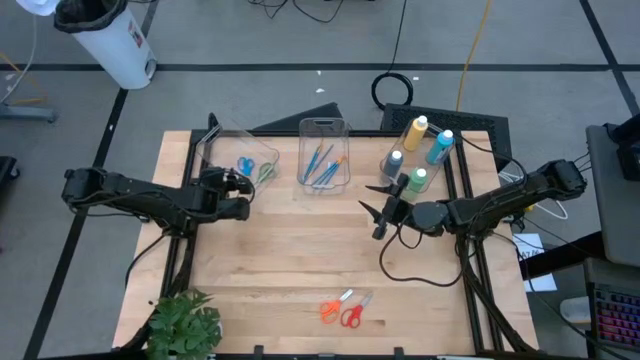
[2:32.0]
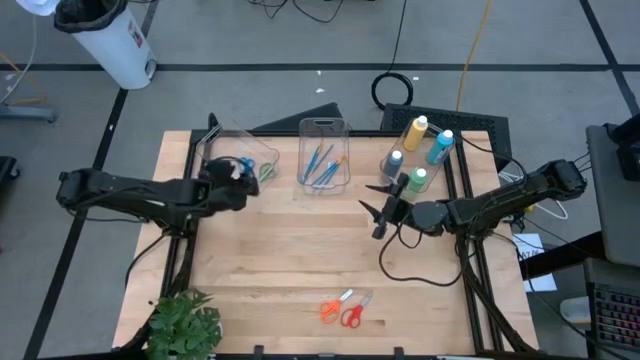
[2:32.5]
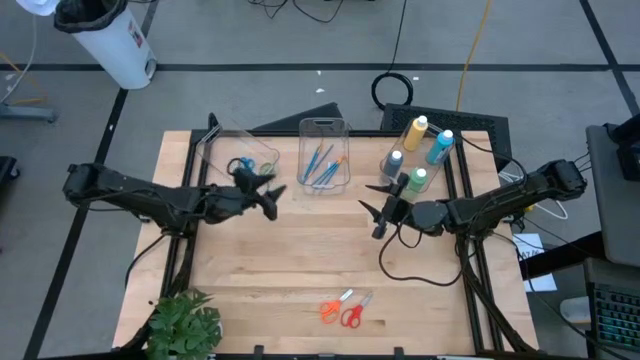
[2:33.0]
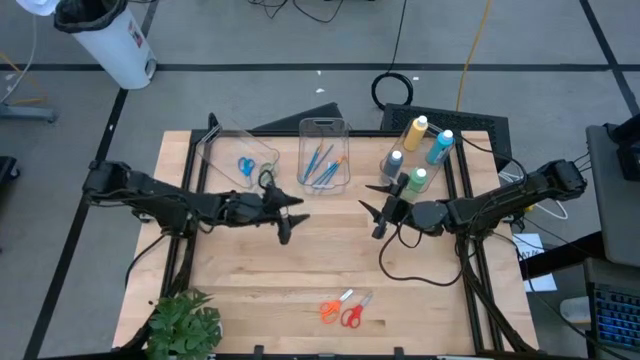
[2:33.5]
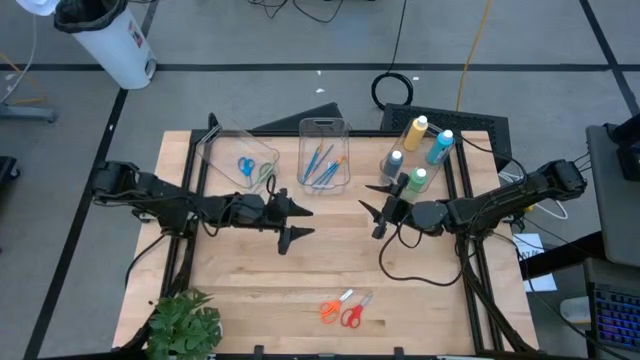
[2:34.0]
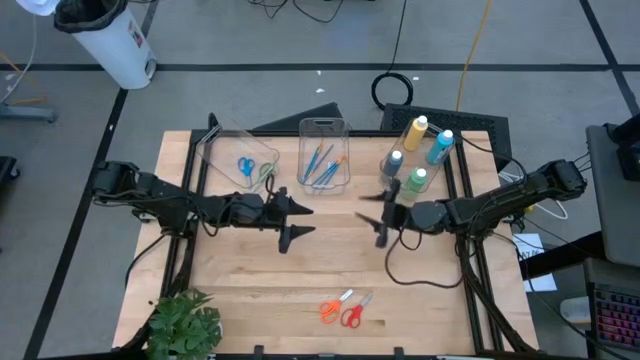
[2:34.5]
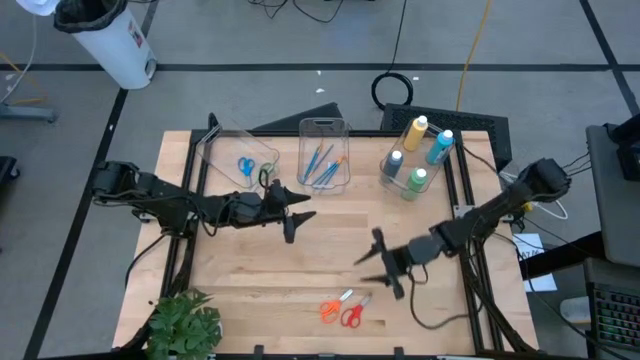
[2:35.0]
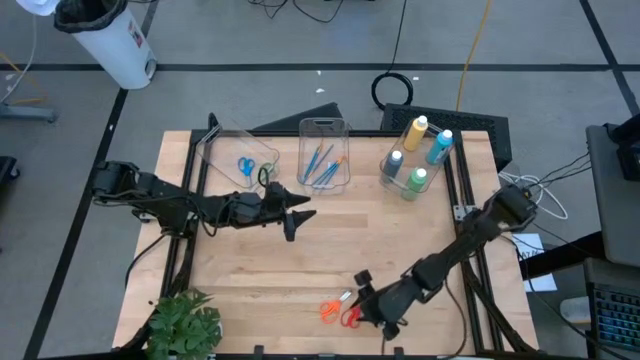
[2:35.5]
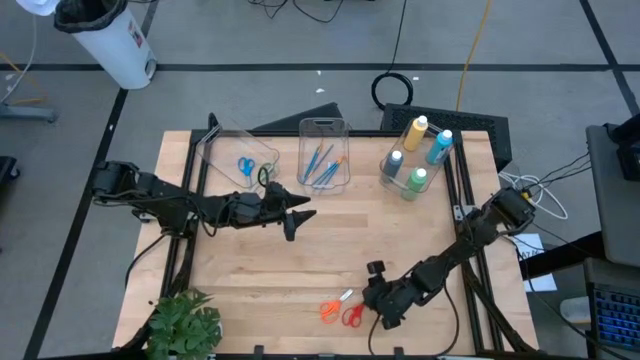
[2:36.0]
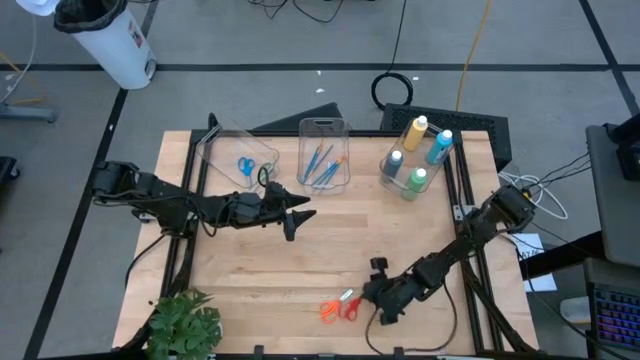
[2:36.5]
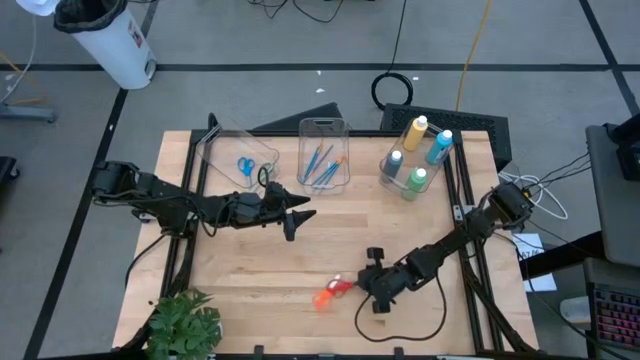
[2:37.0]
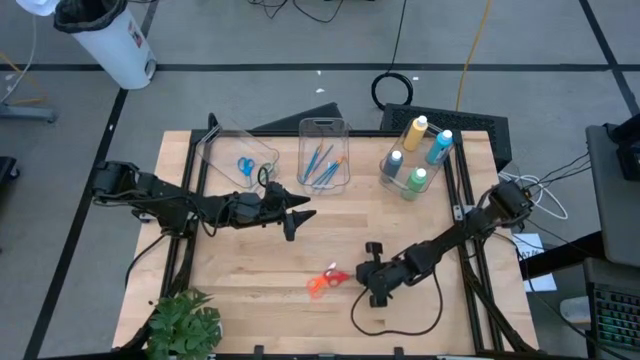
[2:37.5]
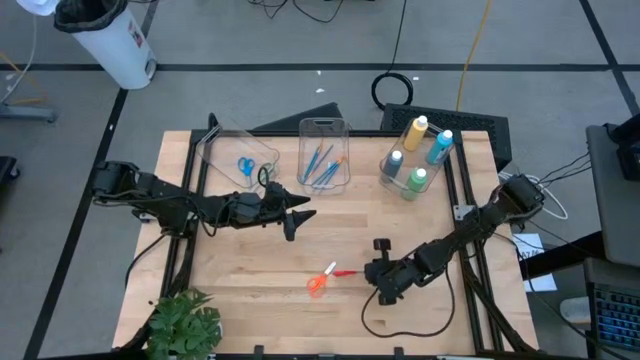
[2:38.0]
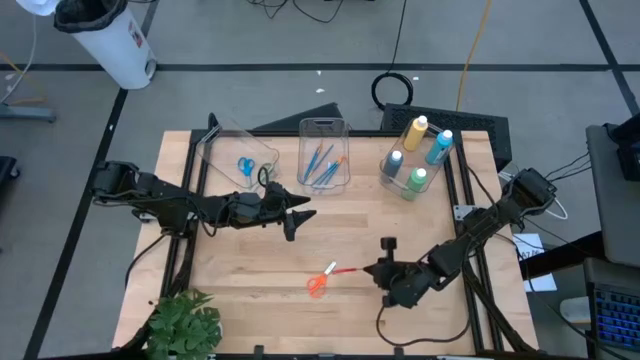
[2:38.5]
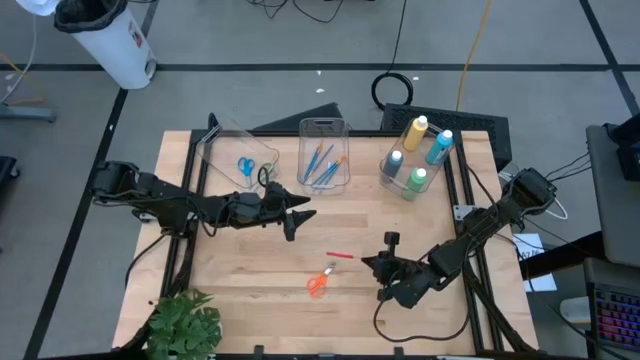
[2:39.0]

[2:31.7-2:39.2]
Task: Pick & Place Paint Supplies
Put the red scissors into the left transparent bin

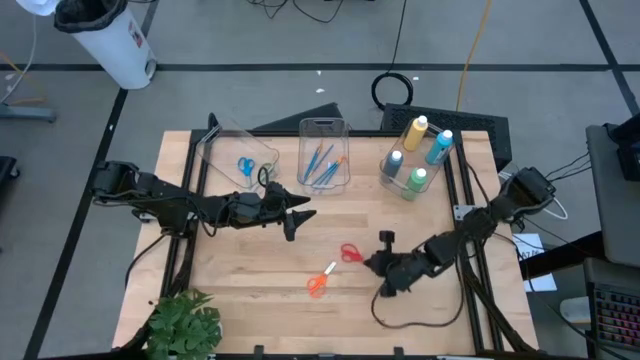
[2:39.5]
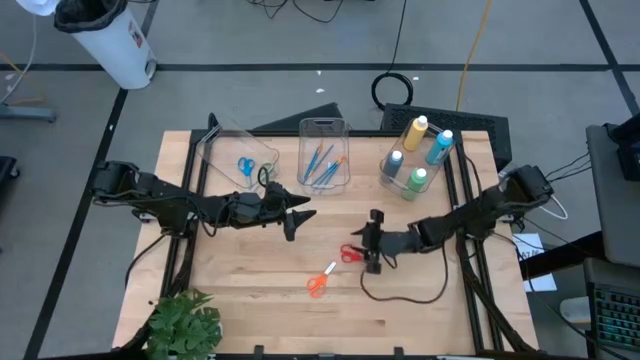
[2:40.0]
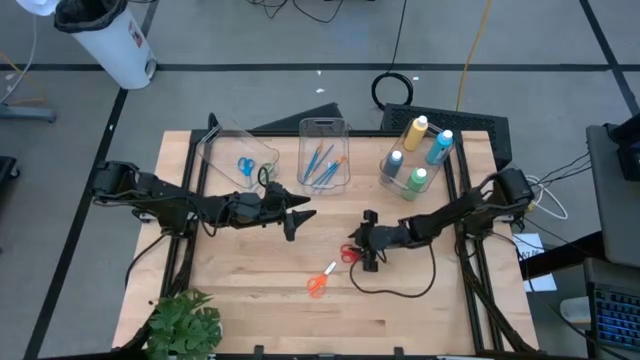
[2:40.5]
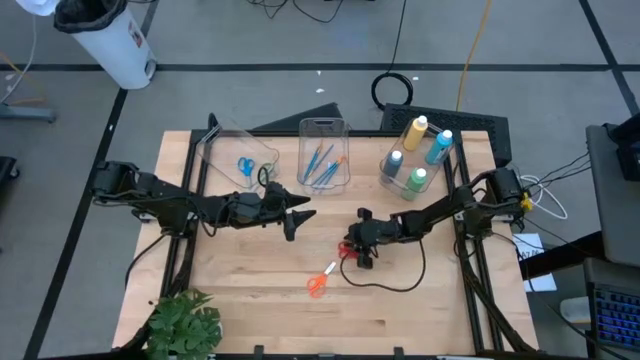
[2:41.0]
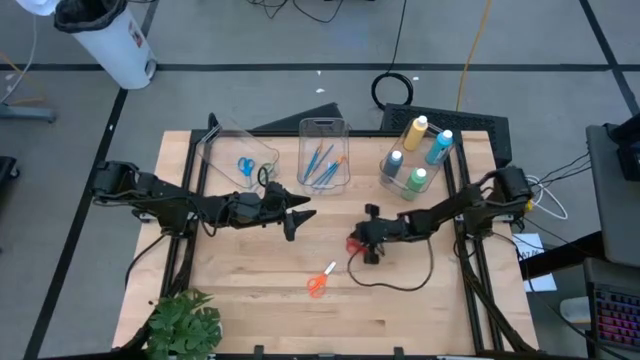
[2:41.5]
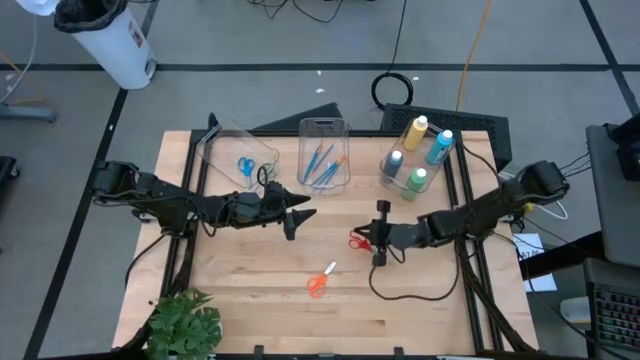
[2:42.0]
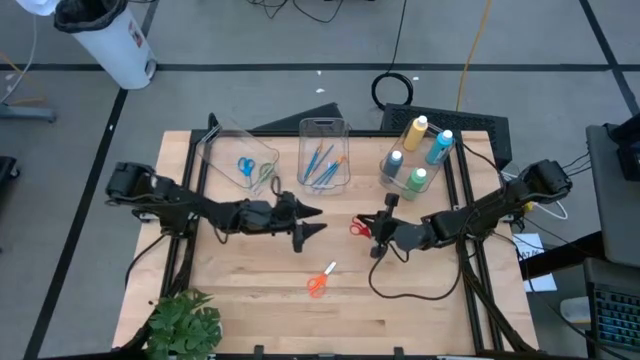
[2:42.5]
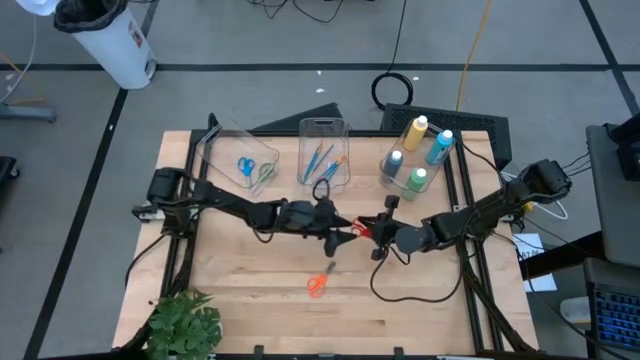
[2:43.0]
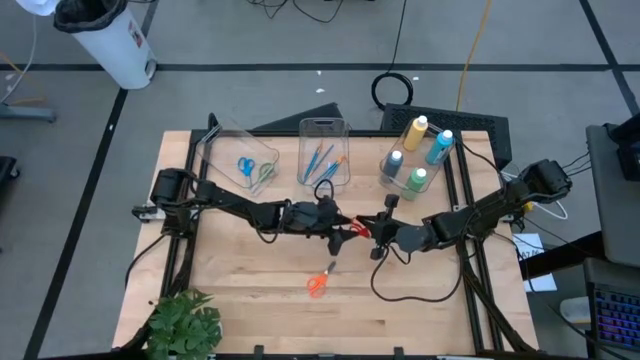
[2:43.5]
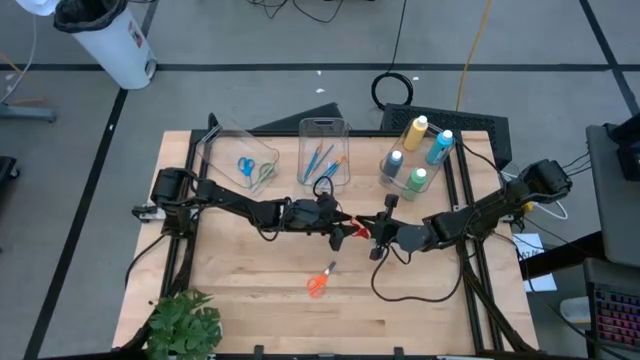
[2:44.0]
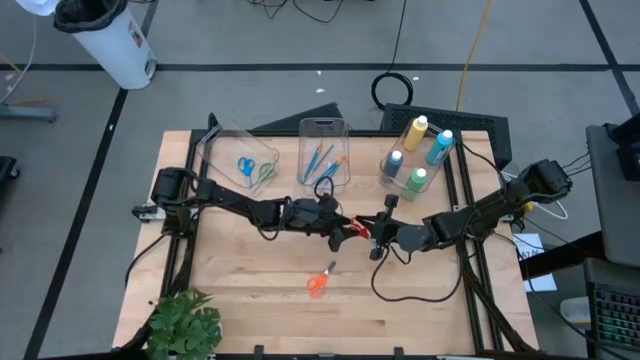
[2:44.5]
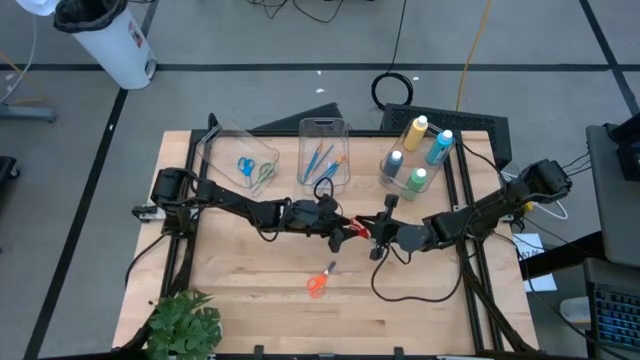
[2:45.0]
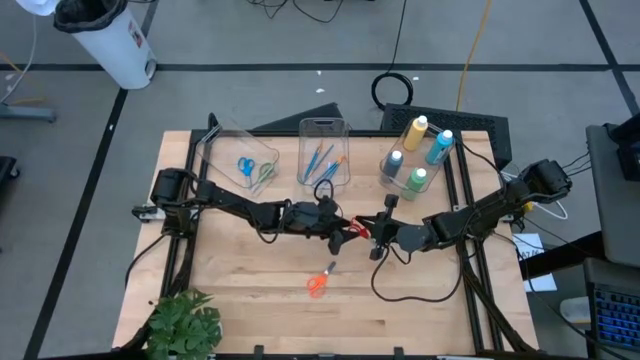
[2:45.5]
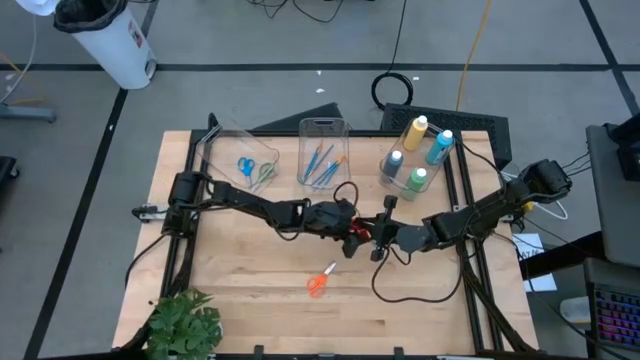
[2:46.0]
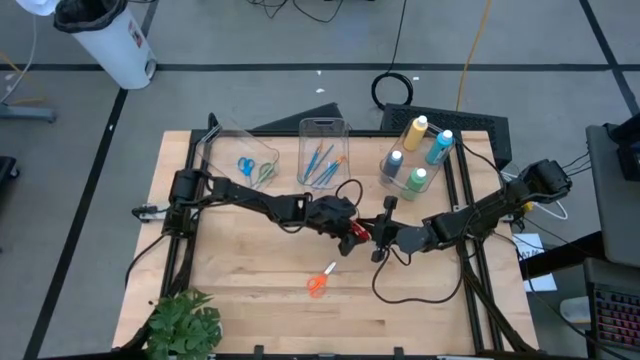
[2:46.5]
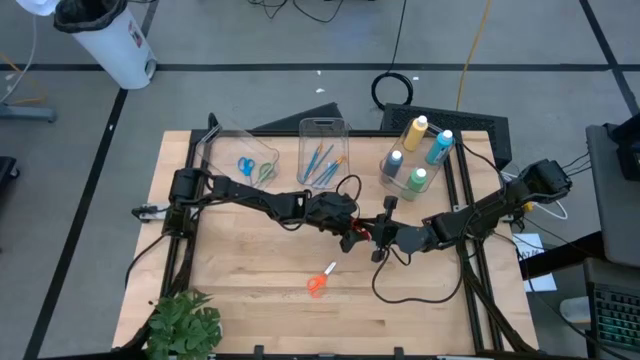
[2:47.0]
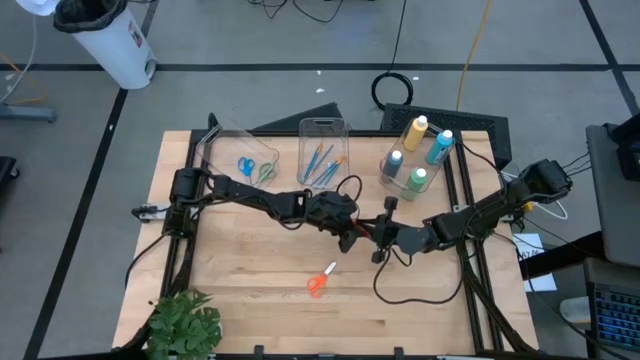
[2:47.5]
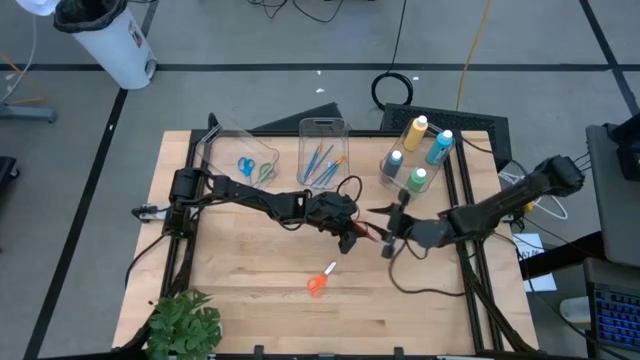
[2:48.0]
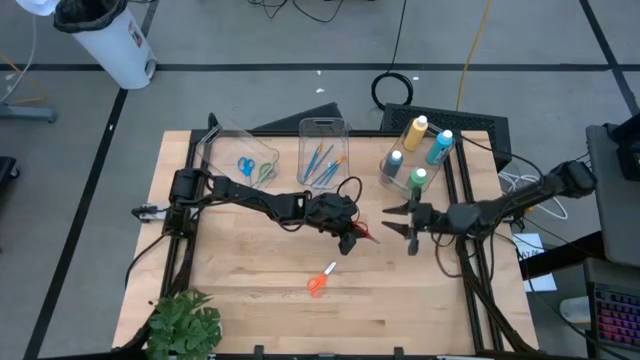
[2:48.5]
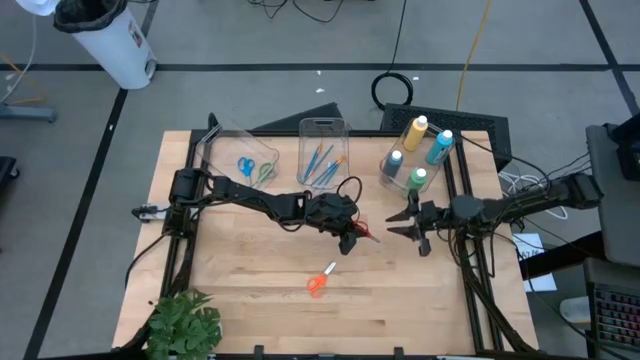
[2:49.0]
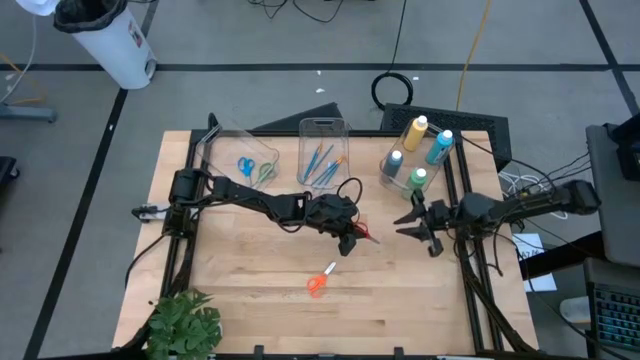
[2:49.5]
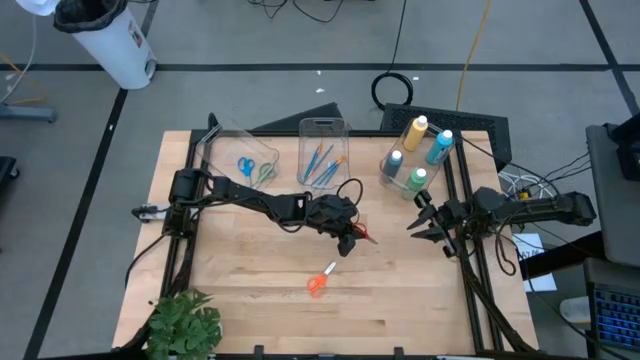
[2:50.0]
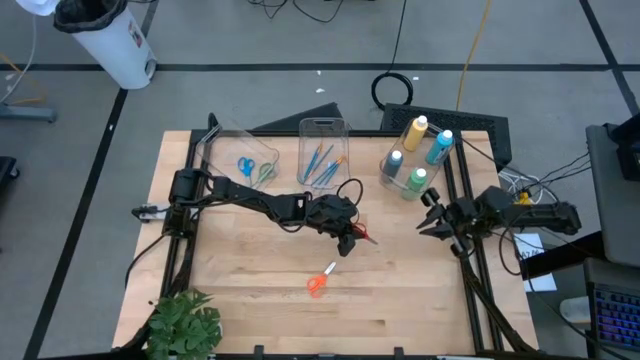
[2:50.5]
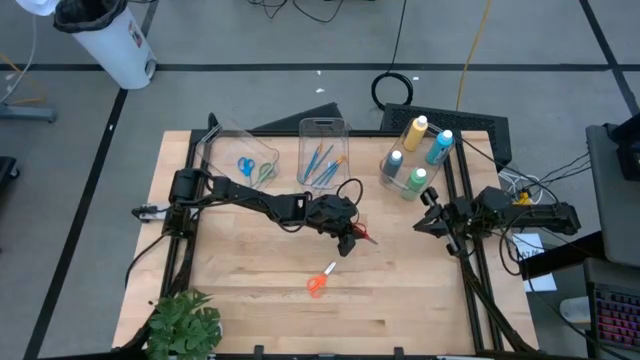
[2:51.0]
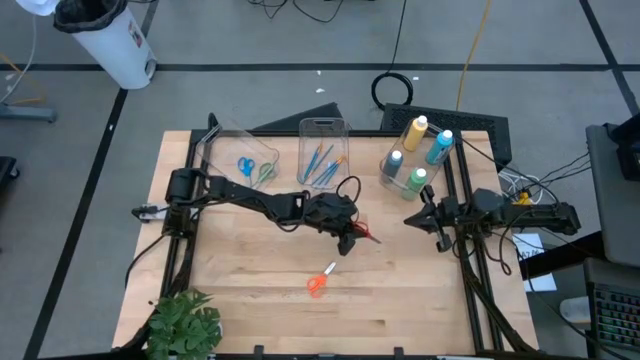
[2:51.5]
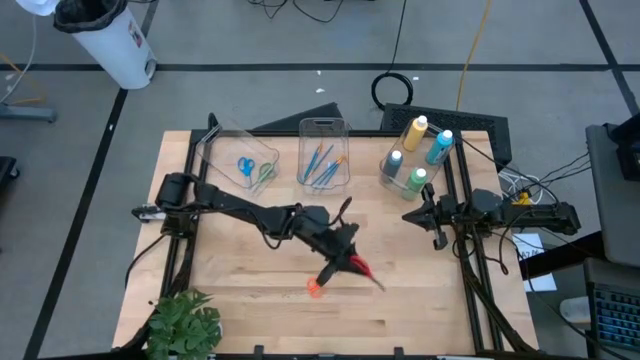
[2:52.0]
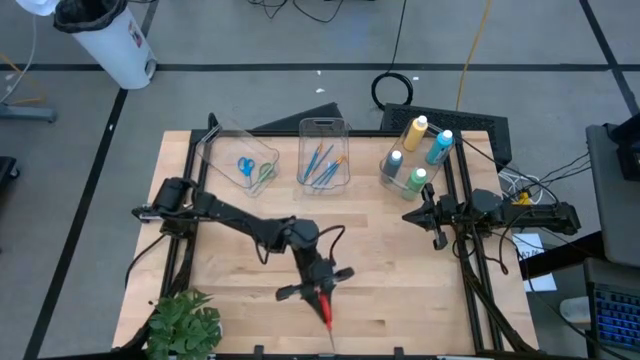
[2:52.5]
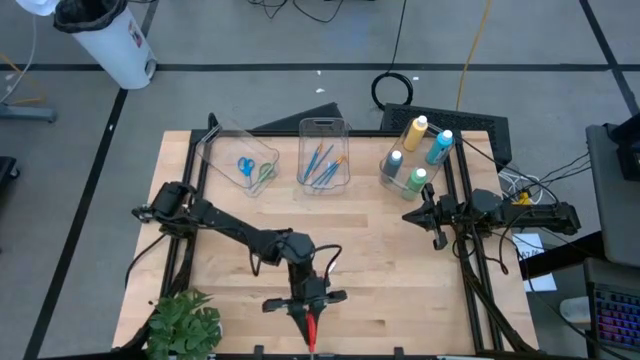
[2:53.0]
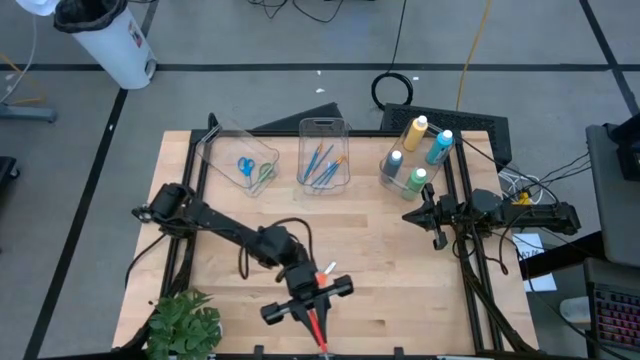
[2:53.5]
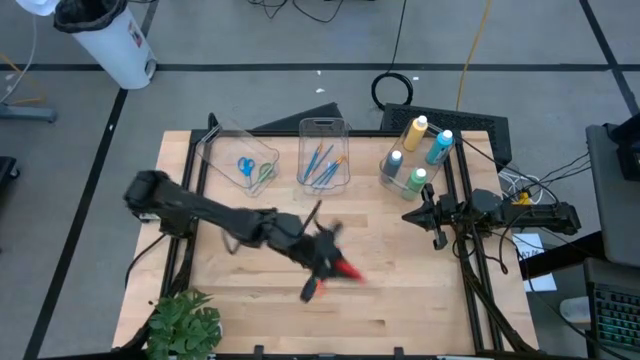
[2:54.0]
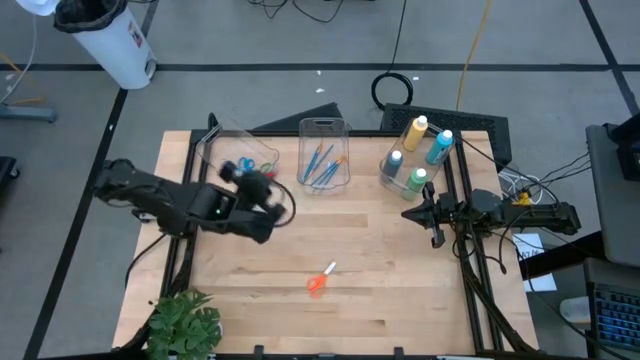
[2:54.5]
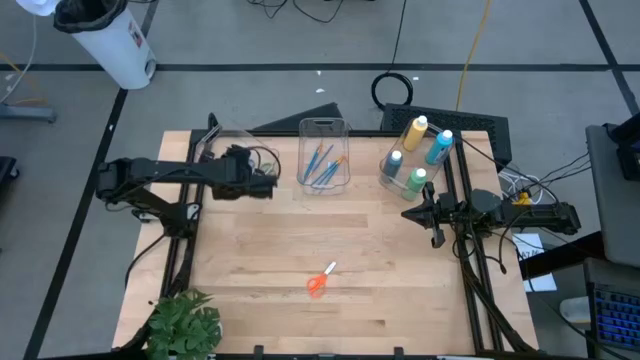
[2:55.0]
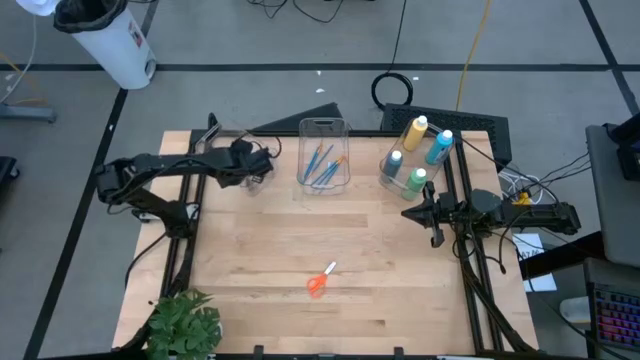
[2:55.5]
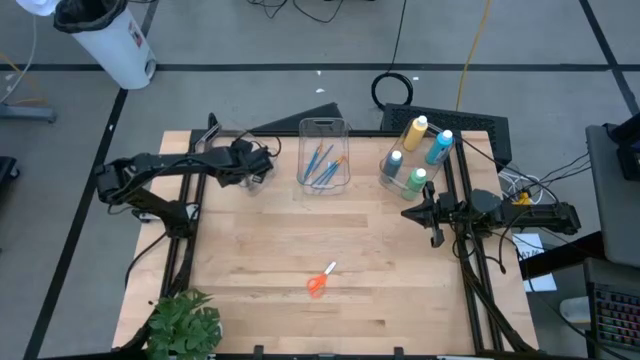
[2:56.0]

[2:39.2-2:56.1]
Put the red scissors into the left transparent bin
